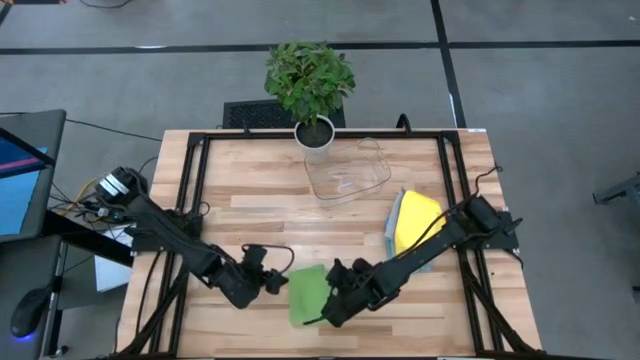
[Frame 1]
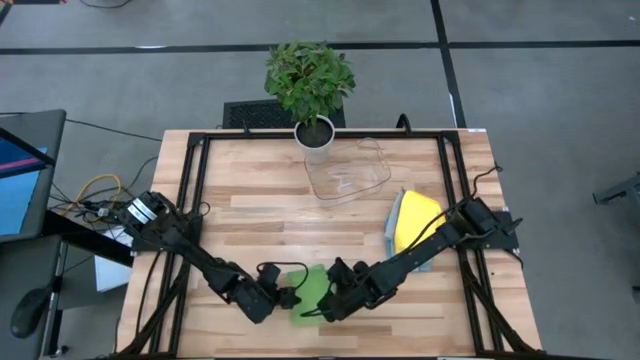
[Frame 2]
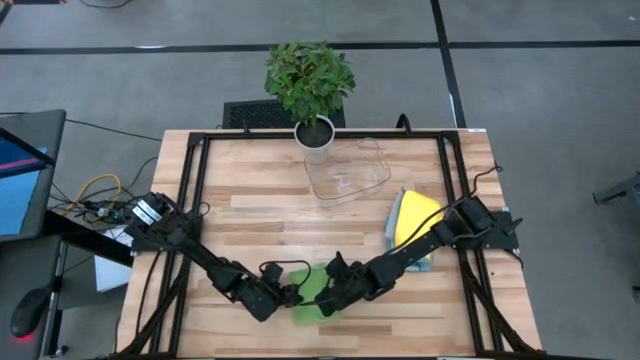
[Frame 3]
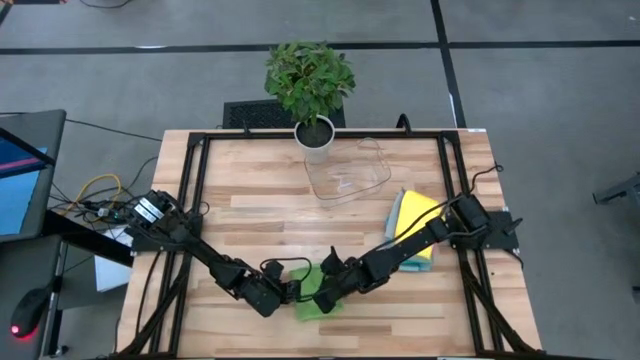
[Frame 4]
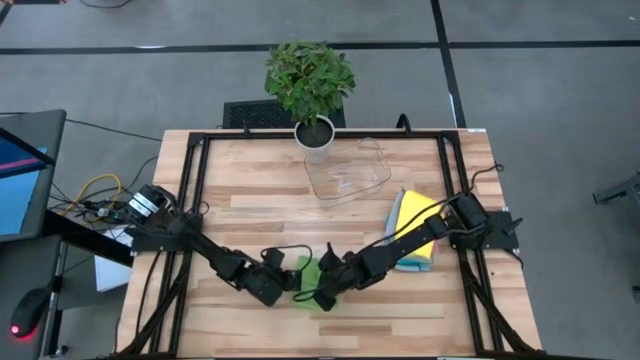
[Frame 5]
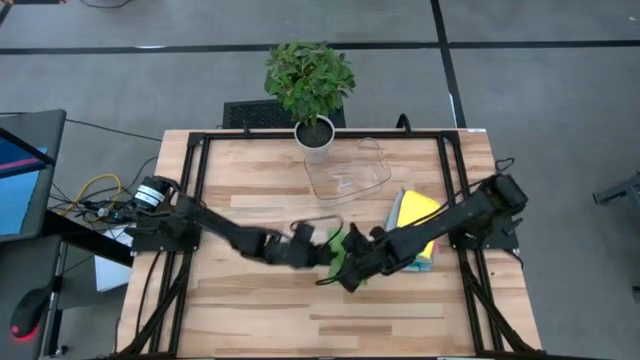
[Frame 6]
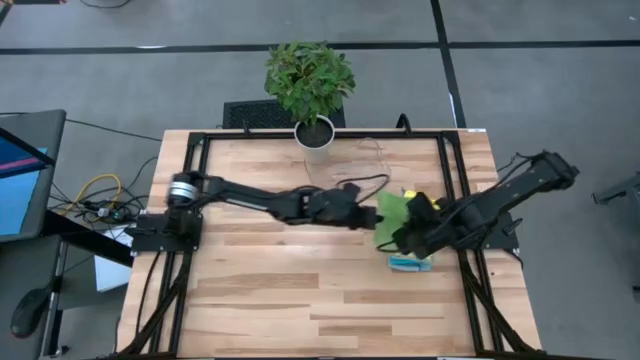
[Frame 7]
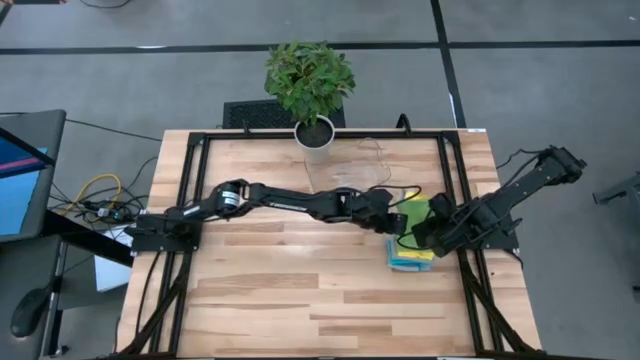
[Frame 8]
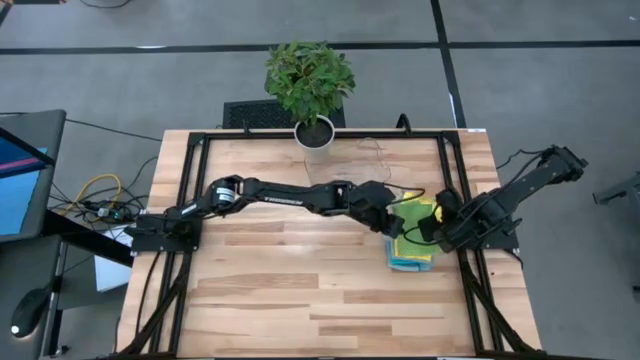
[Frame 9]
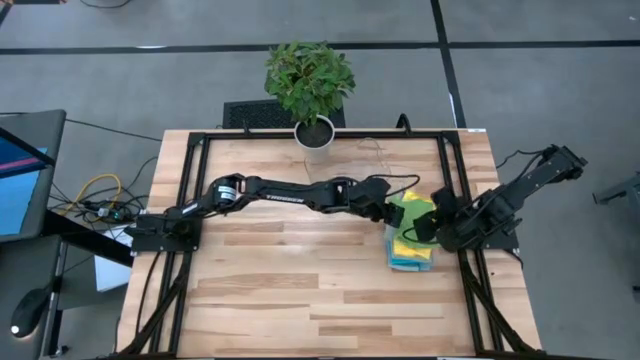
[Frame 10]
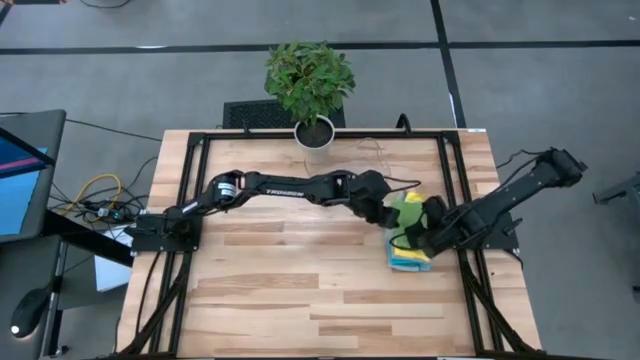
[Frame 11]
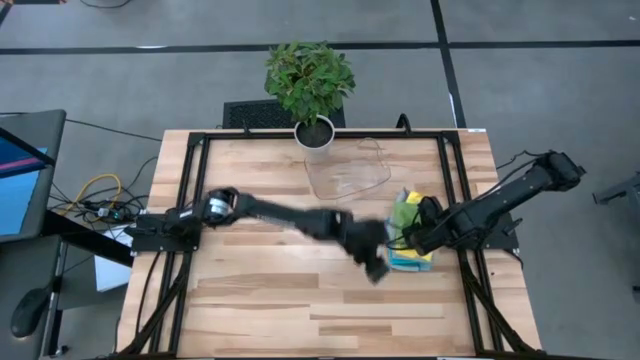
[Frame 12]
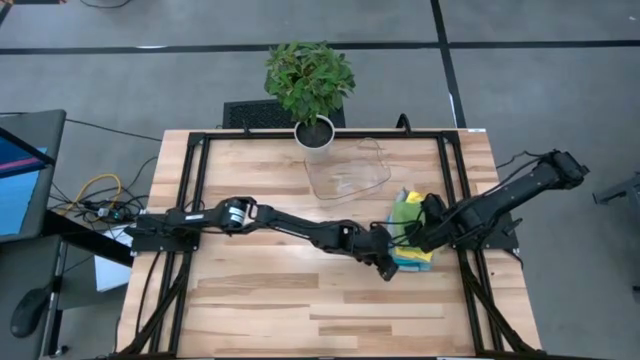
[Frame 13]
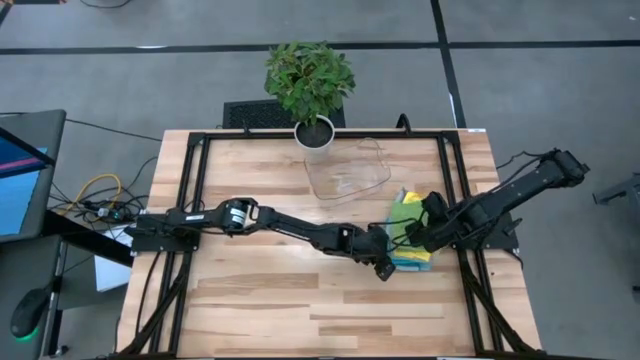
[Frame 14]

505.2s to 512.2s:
Task: Fold microfiber towels
Stack the green microfiber cloth on top of the yellow microfiber cloth

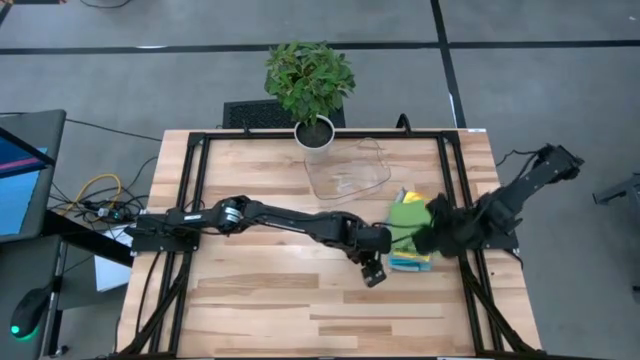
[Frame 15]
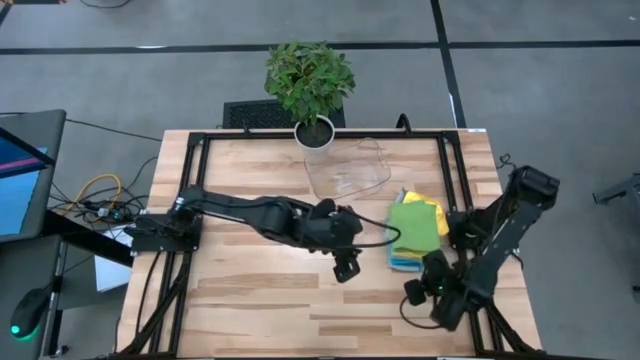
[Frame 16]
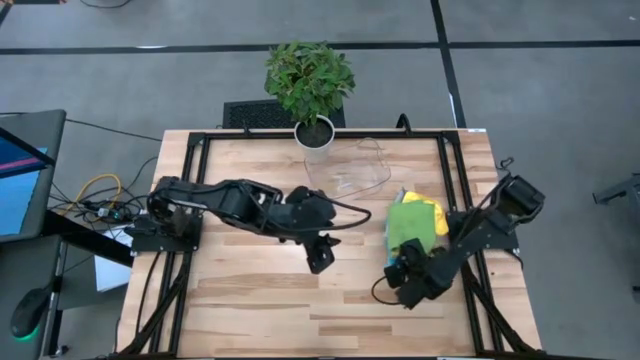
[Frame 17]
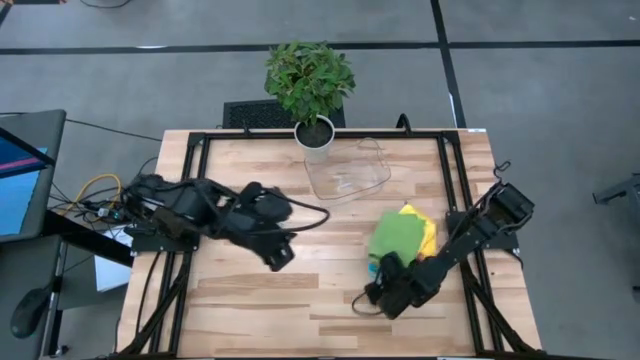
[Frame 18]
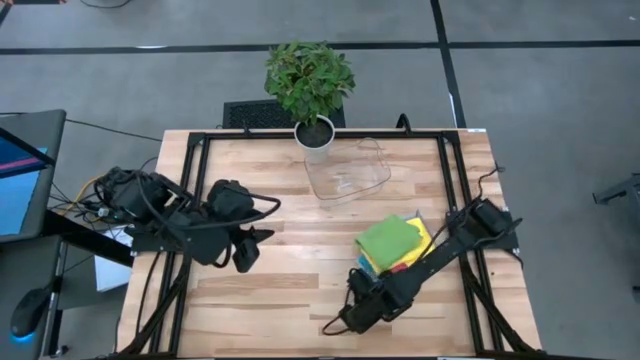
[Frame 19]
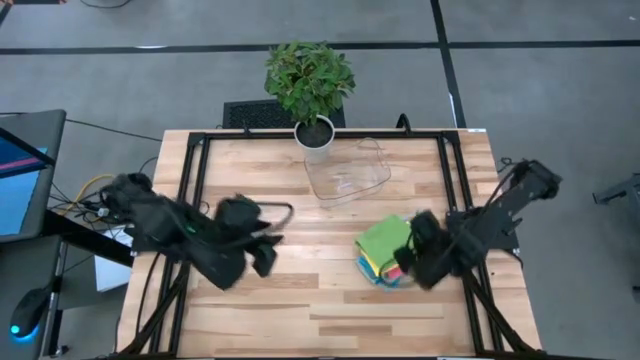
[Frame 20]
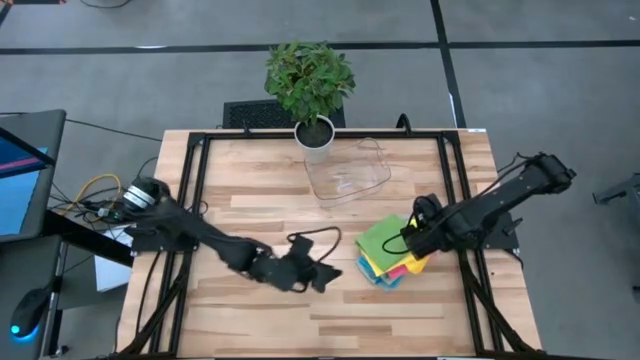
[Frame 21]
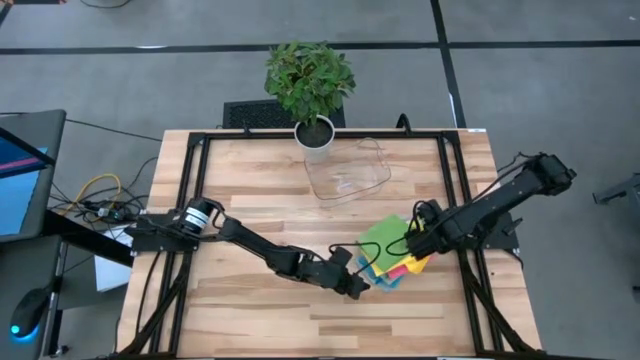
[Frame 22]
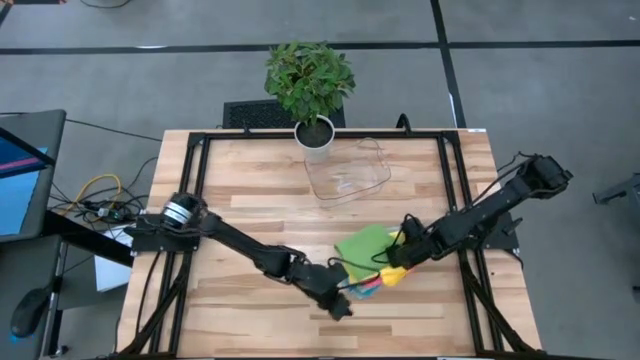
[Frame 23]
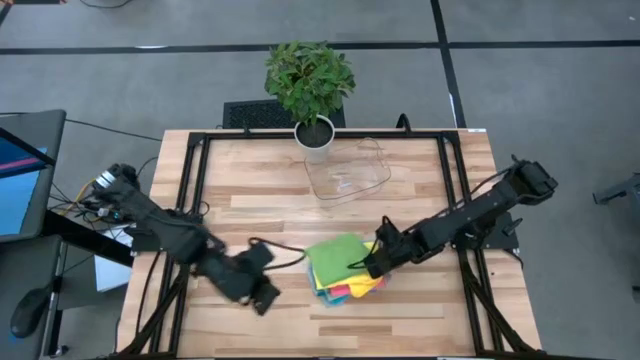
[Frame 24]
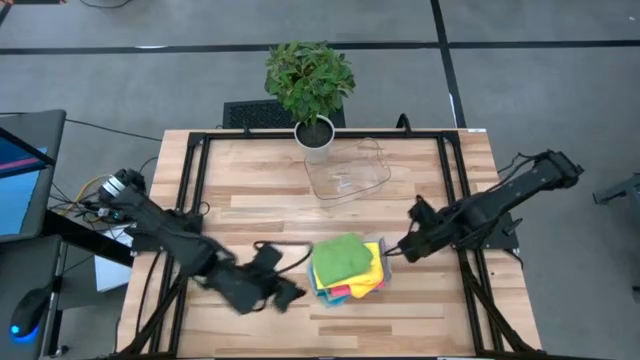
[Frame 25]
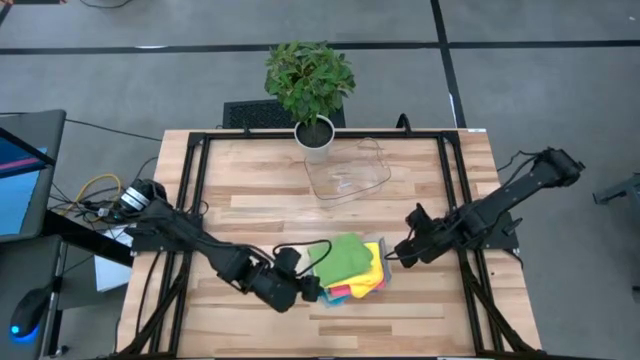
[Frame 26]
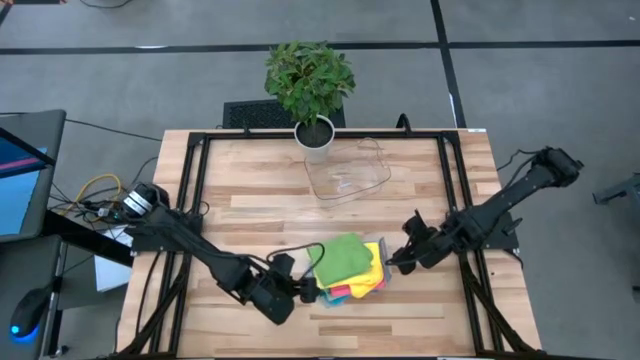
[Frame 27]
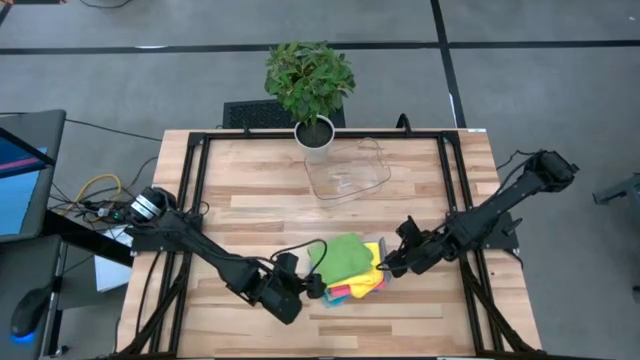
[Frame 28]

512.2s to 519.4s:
Move the stacked microfiber cloths to the center of the table

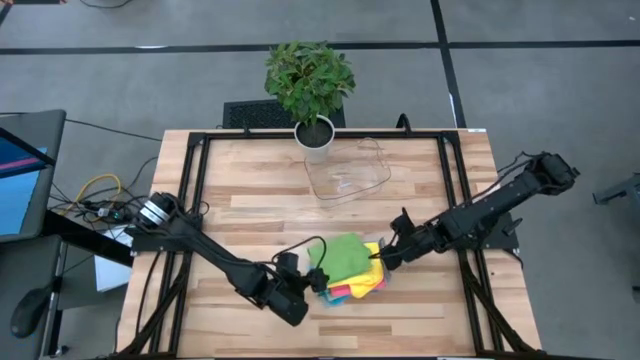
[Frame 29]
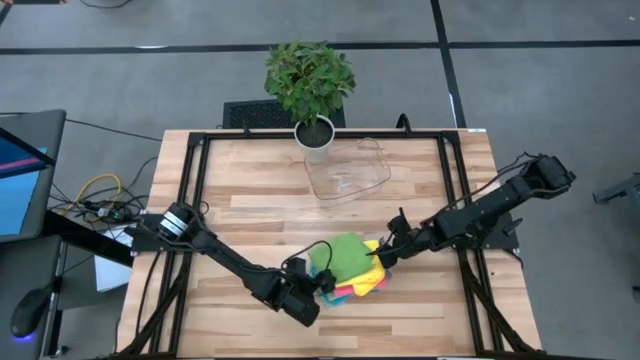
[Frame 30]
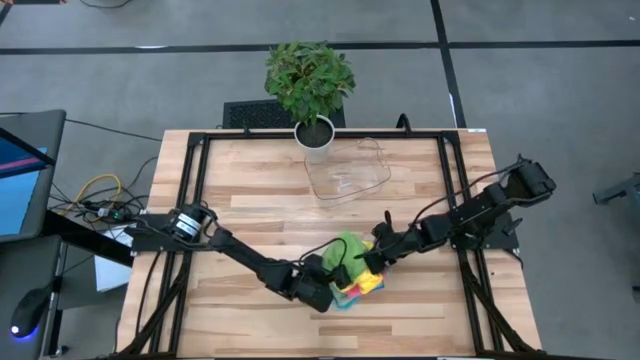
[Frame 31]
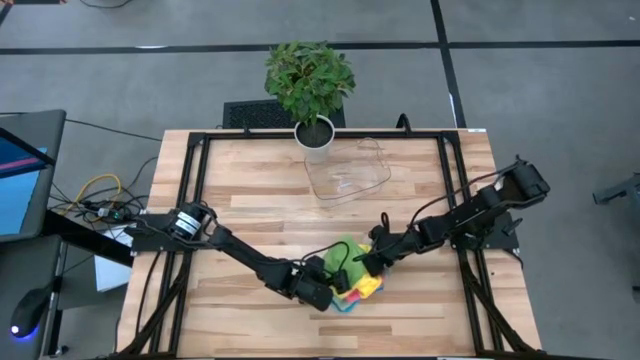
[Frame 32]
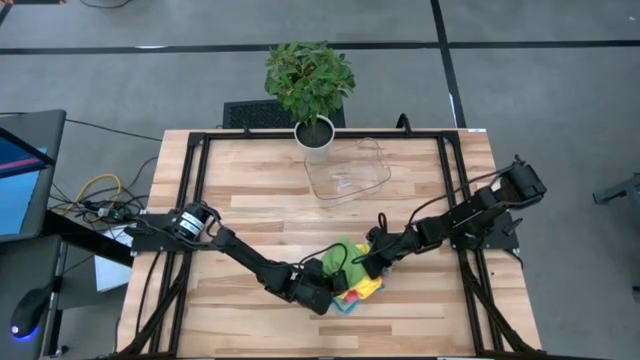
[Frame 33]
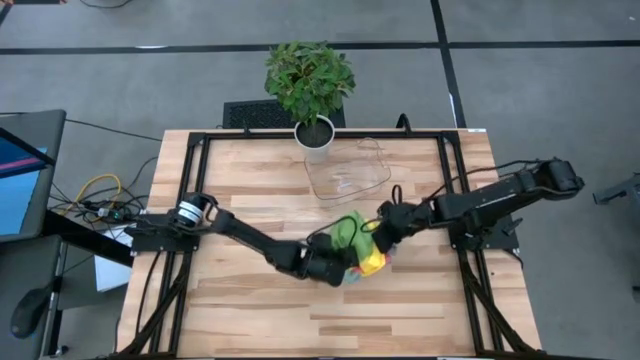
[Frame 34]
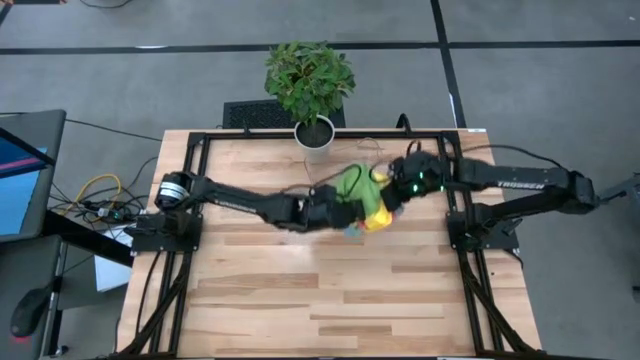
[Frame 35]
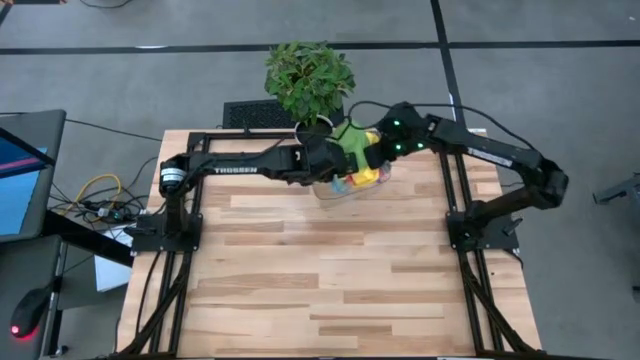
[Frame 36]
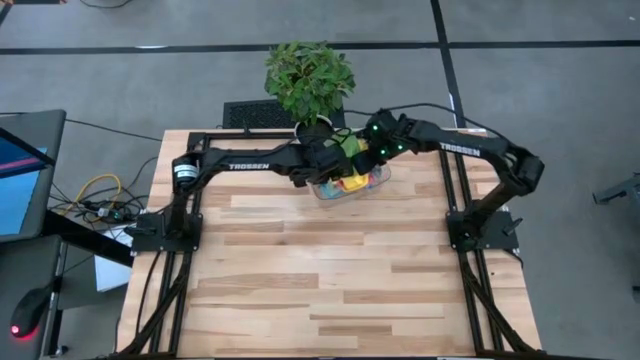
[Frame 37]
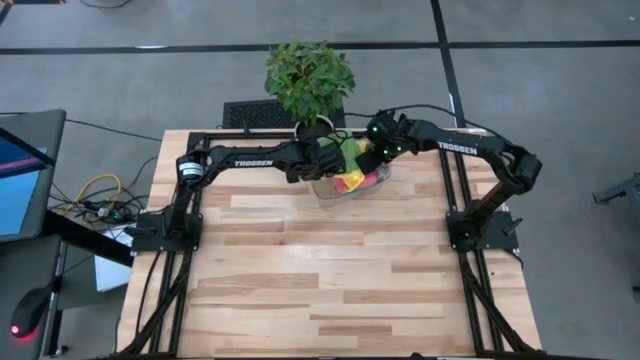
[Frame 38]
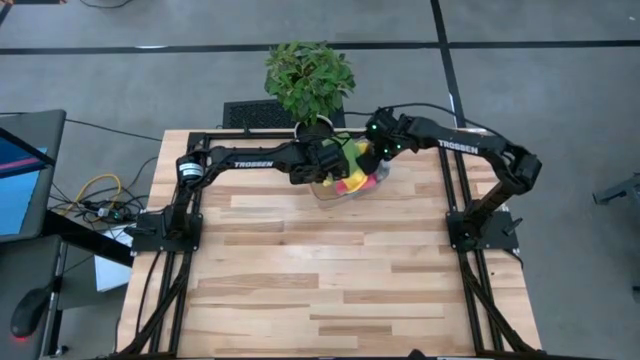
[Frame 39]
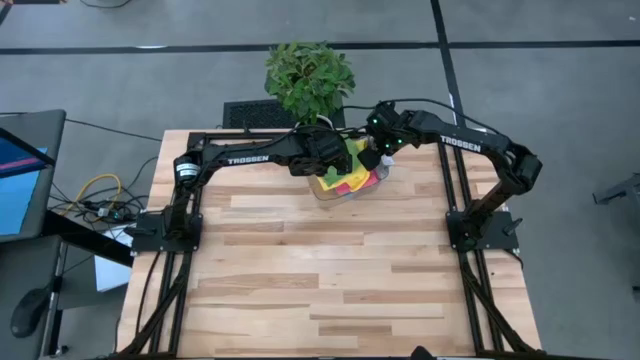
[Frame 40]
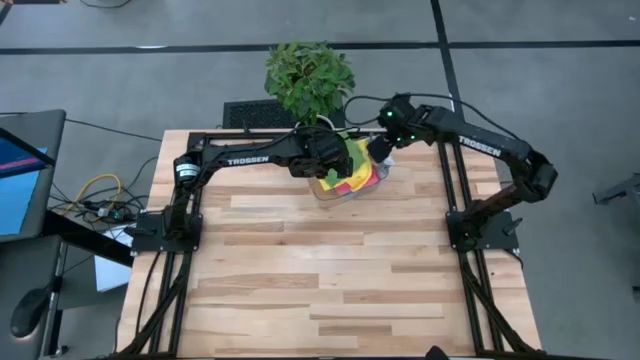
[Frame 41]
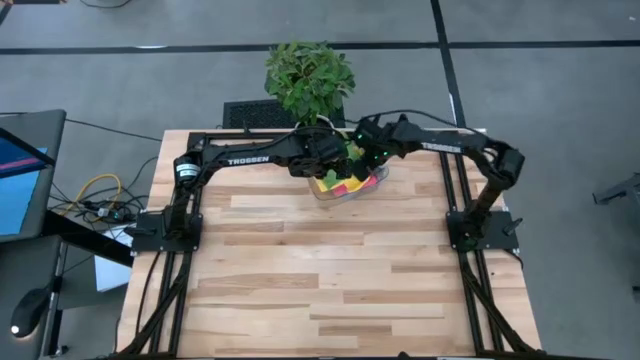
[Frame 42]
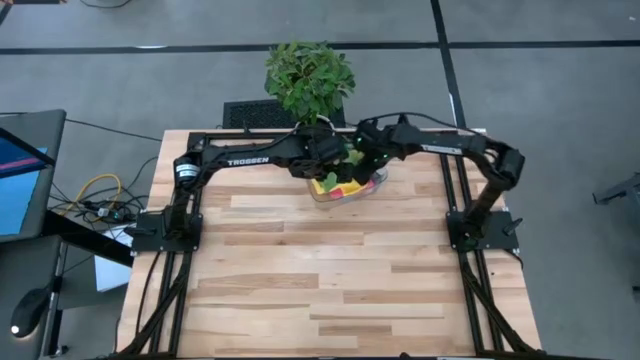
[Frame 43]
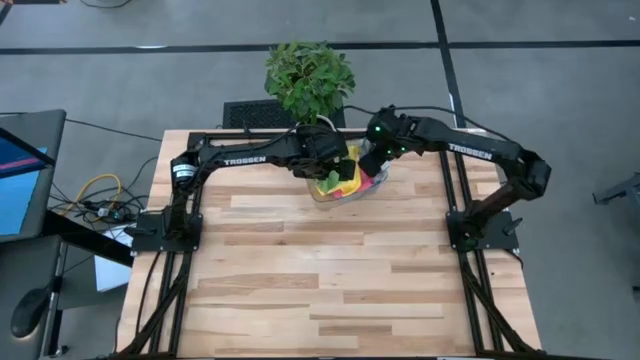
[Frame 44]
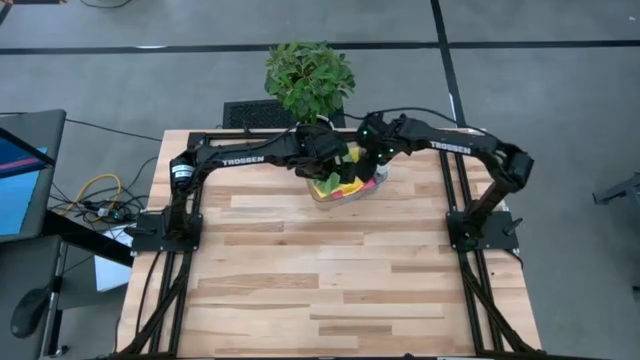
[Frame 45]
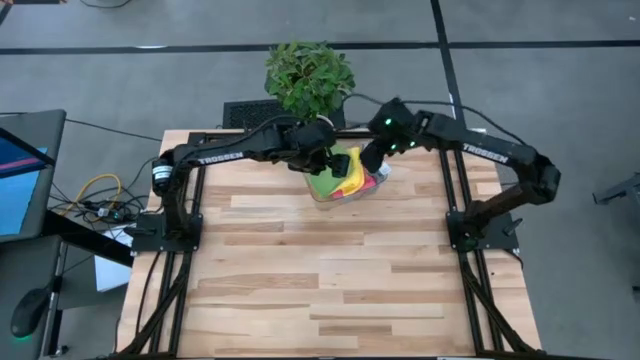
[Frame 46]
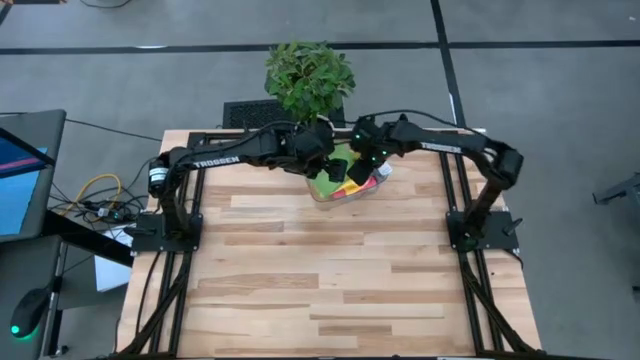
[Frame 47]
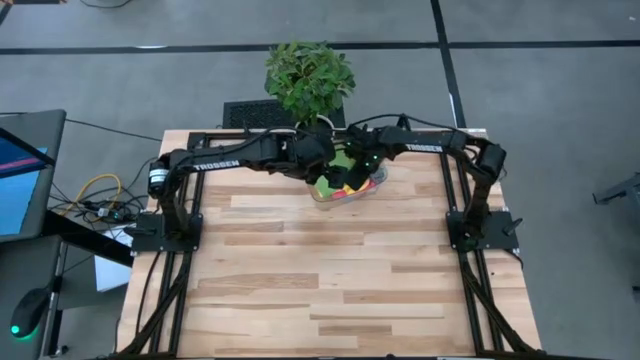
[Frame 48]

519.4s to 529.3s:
Put the stacked microfiber cloths into the transparent bin
